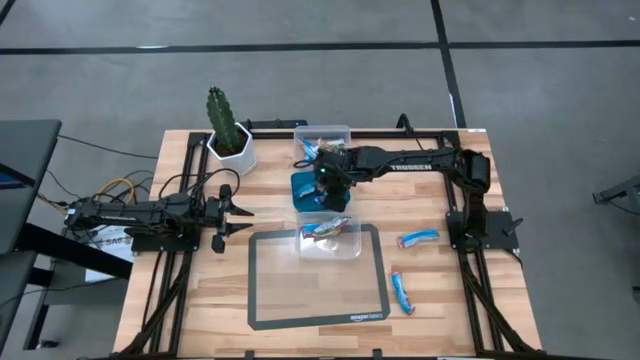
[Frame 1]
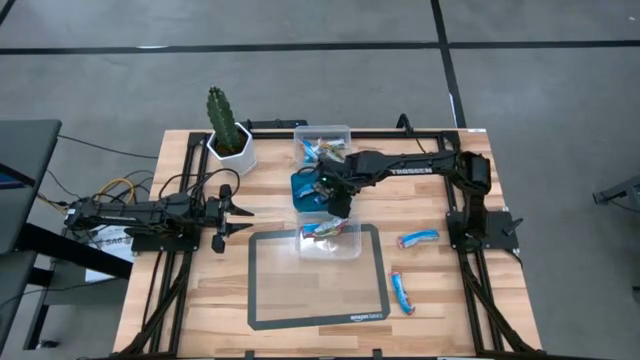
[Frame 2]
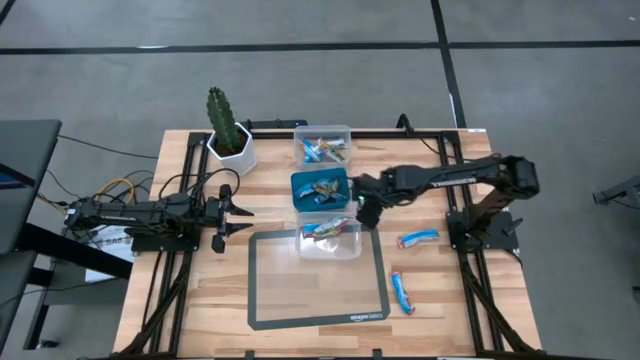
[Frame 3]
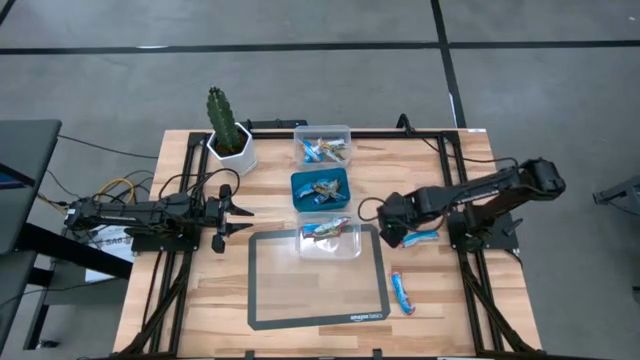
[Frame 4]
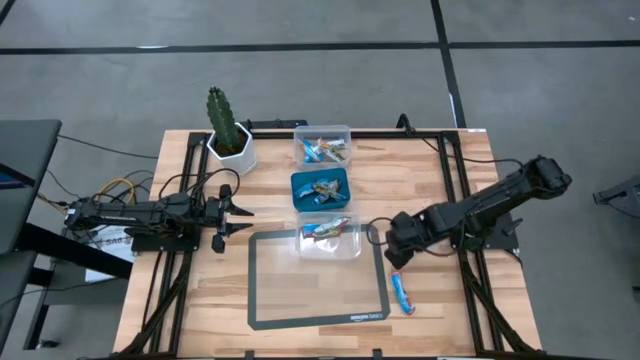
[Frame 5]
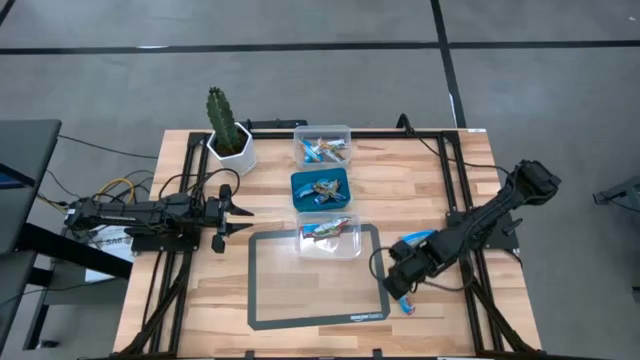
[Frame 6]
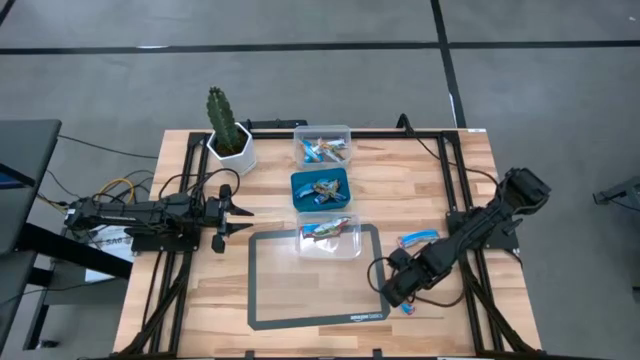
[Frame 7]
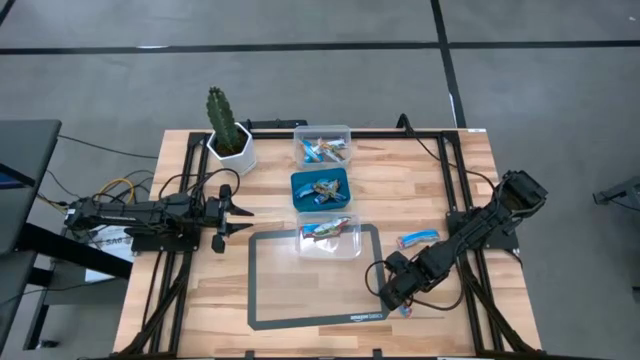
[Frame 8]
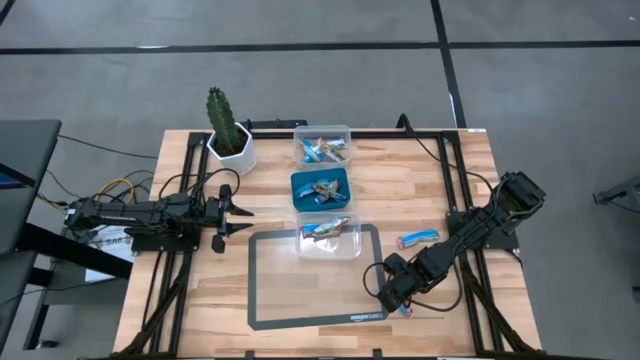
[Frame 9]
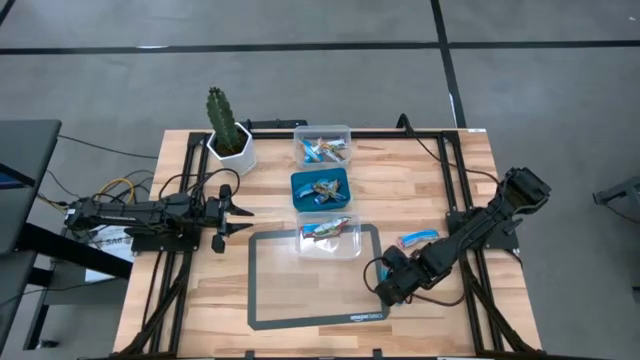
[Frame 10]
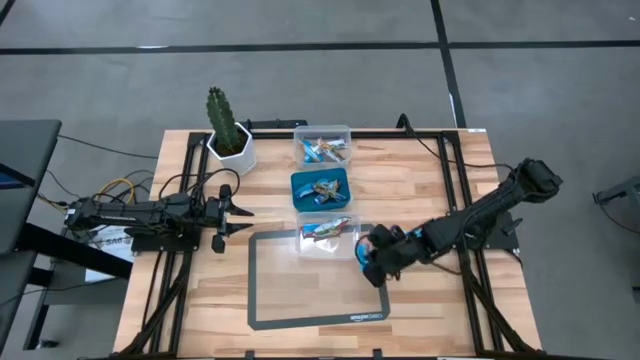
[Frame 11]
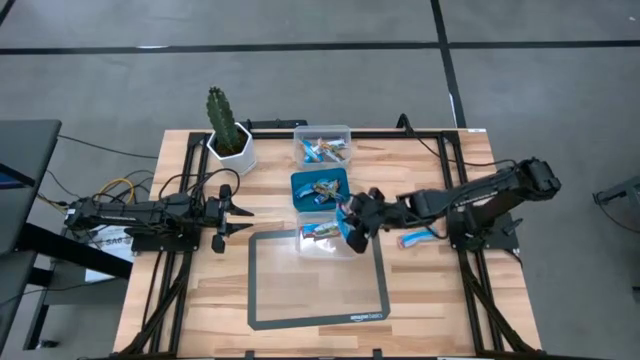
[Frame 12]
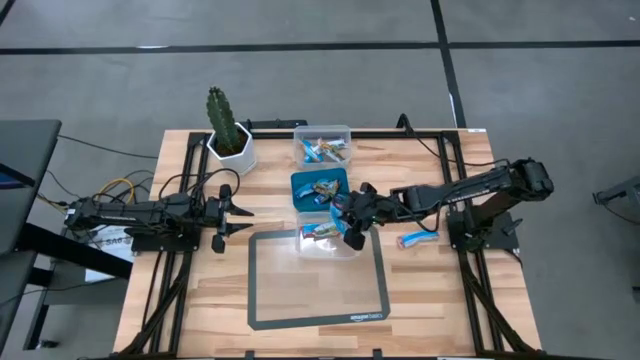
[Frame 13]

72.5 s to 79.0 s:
Task: Pick and place Granola Bars by type
Put the bottom right red granola bar into the bottom transparent bin

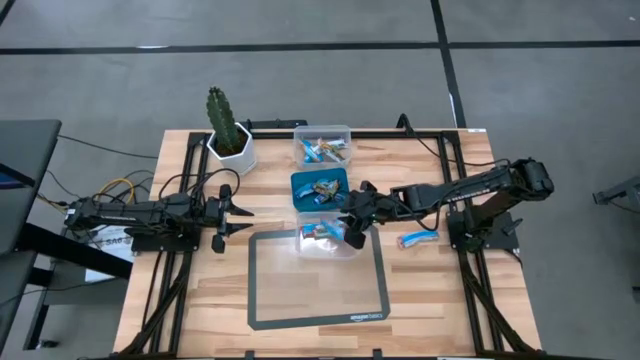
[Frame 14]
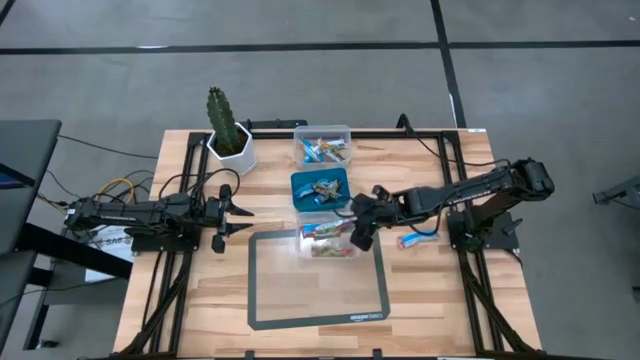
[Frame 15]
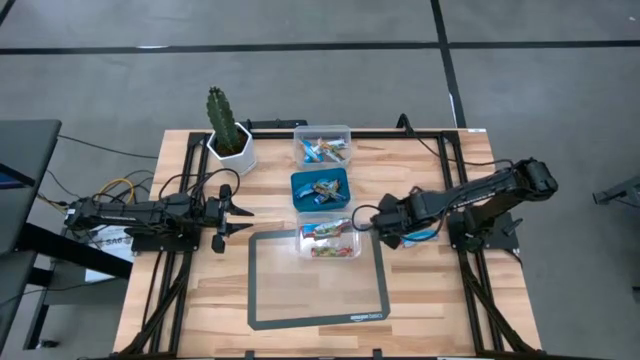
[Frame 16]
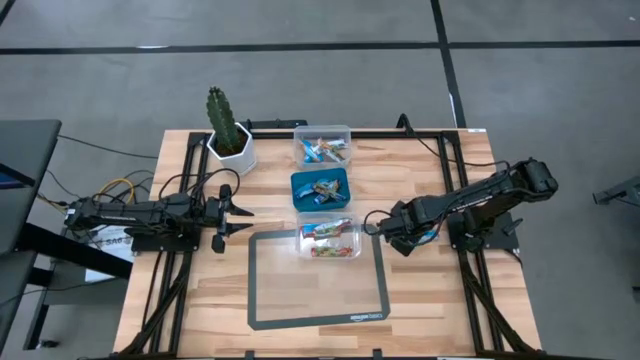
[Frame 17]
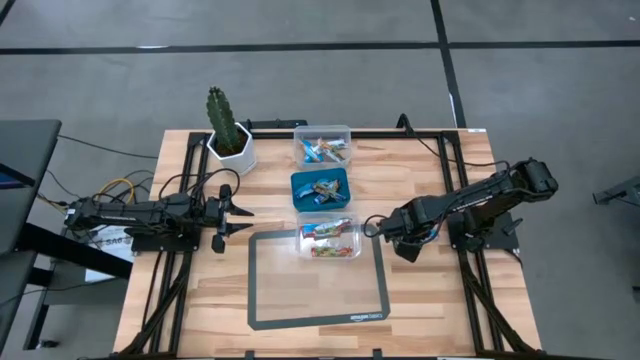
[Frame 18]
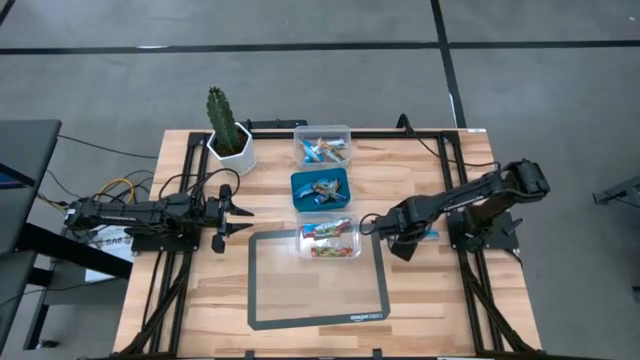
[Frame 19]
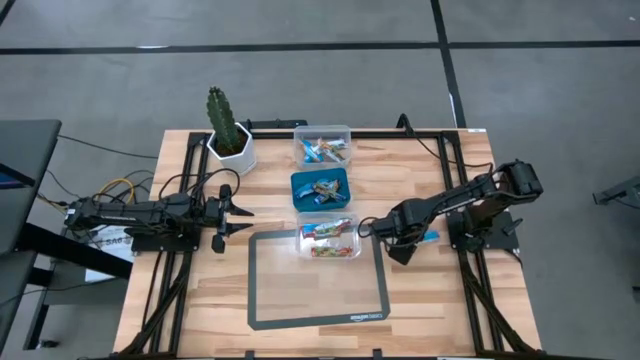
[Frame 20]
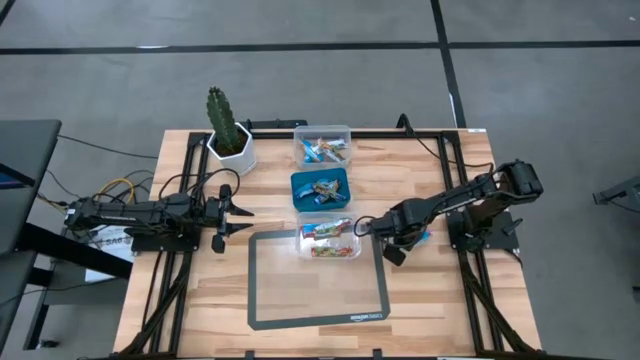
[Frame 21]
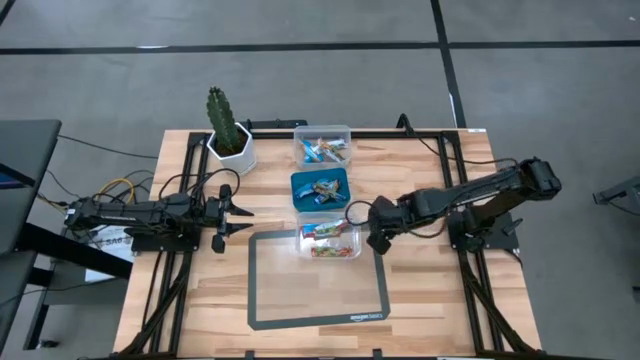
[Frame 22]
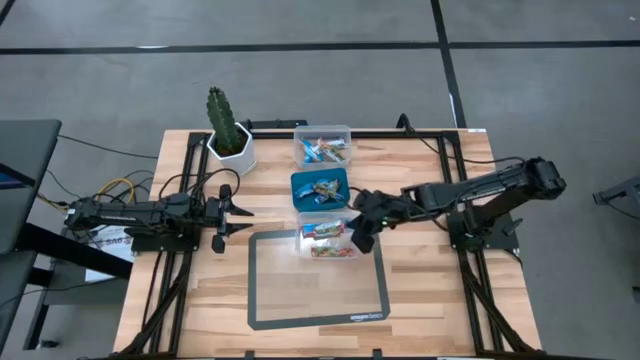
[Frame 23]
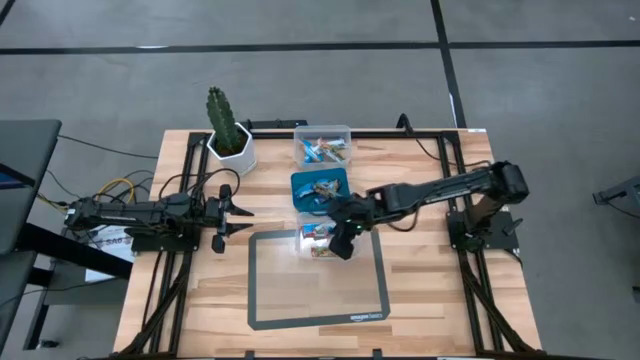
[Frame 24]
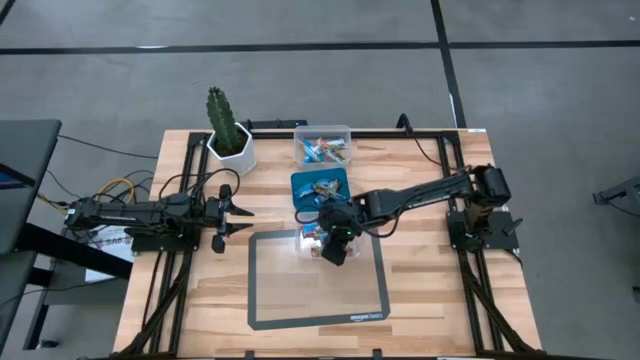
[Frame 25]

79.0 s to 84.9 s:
Put the red granola bar into the bottom transparent bin

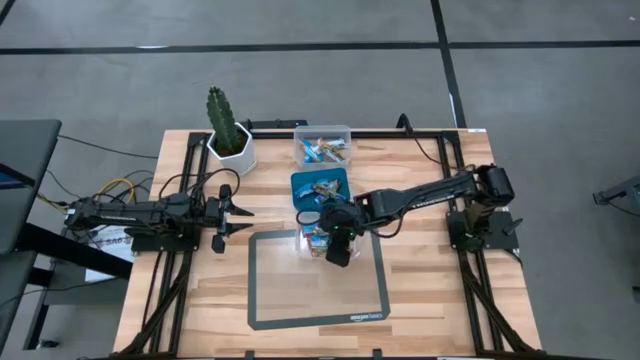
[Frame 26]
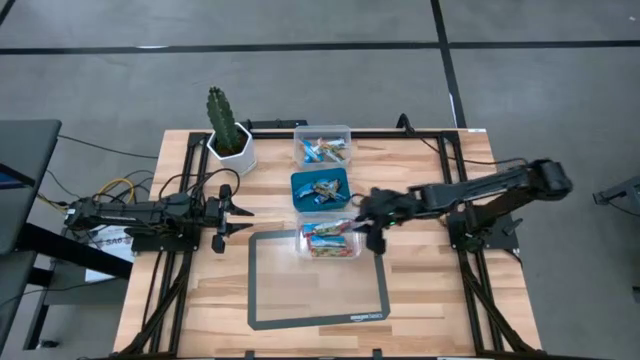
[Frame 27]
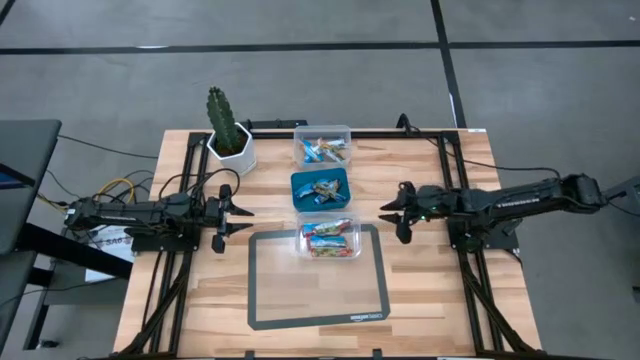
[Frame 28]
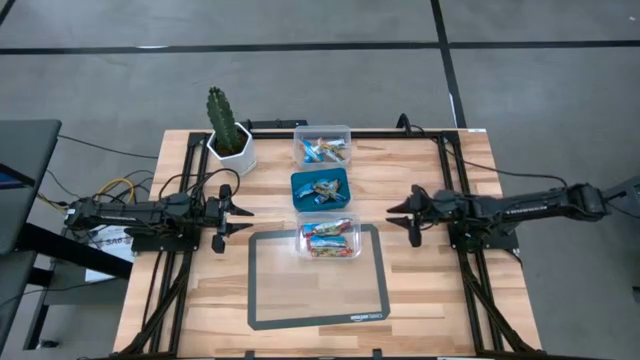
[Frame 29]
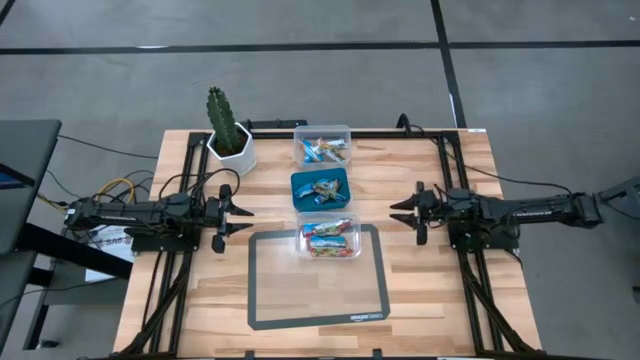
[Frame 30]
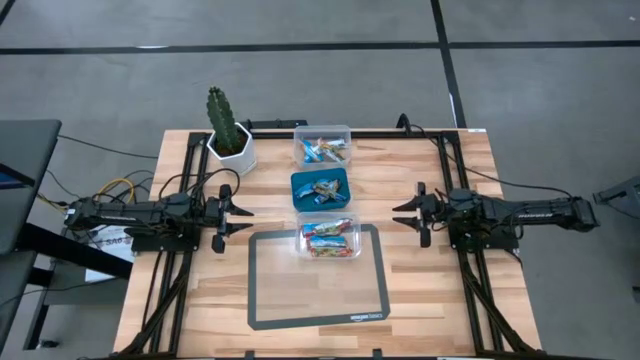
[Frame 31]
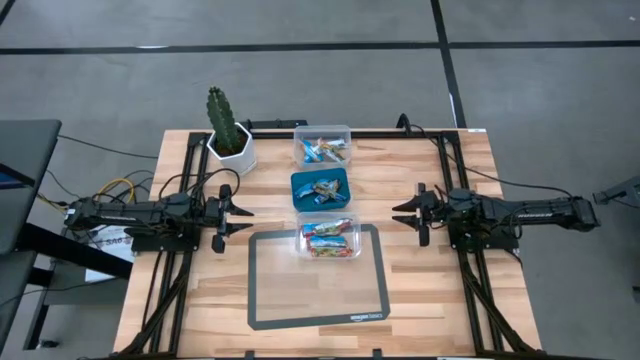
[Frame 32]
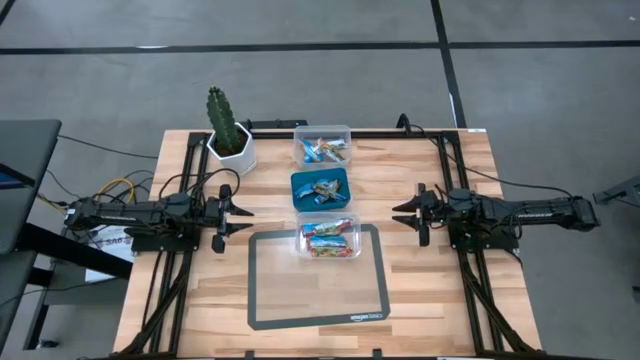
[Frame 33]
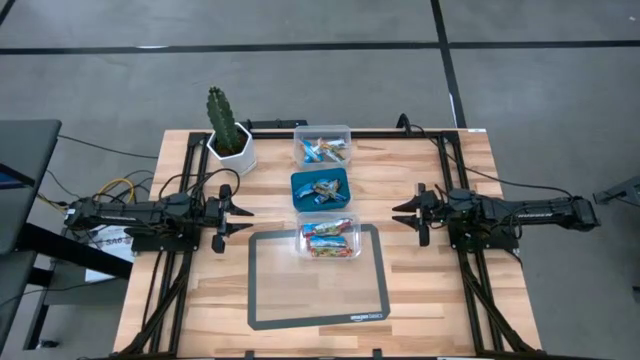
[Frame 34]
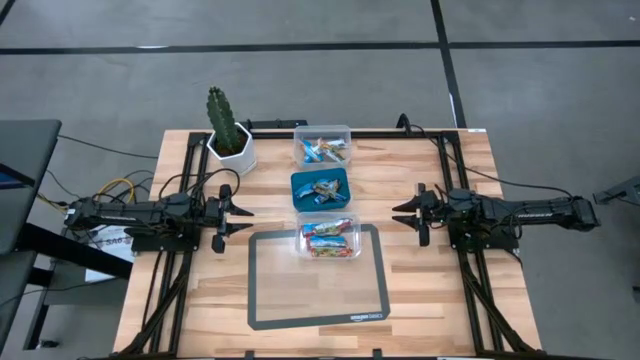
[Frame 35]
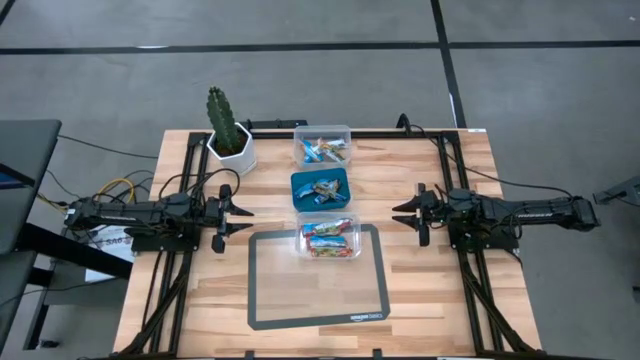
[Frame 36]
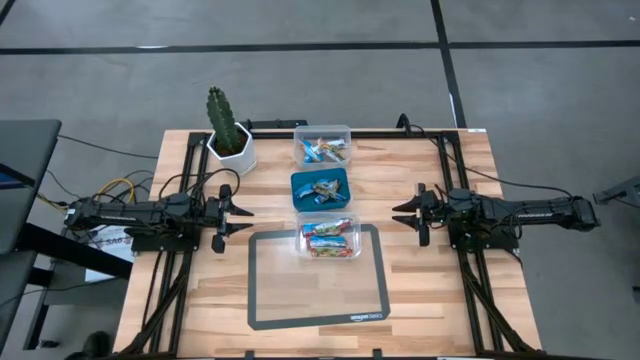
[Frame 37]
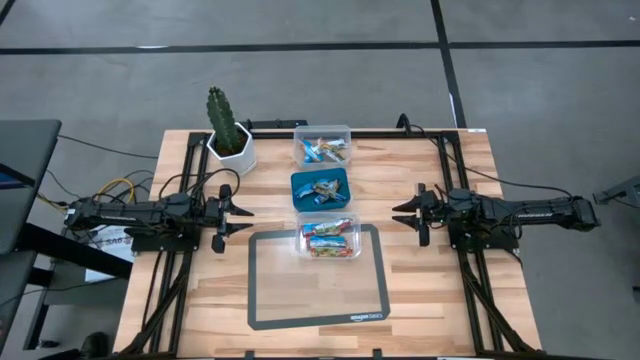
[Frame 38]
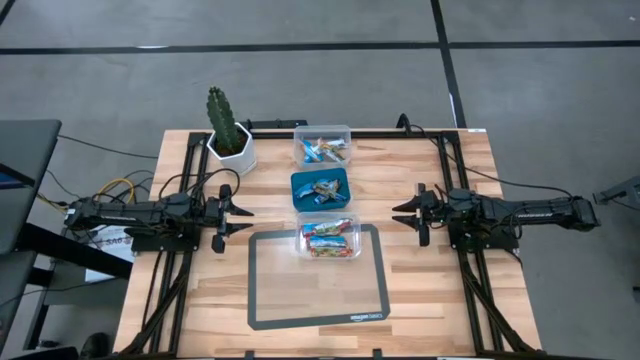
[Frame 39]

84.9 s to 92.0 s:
Return to Home Position

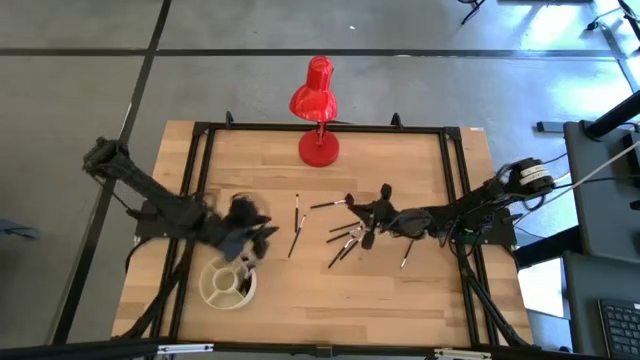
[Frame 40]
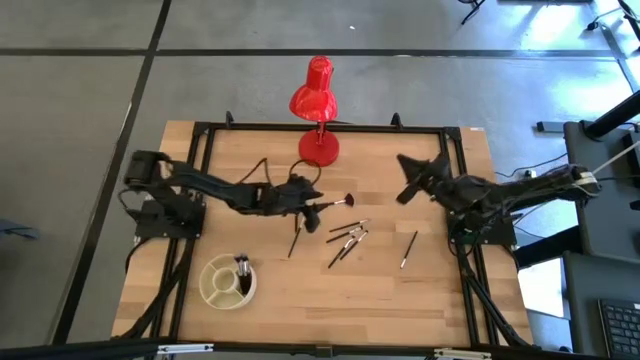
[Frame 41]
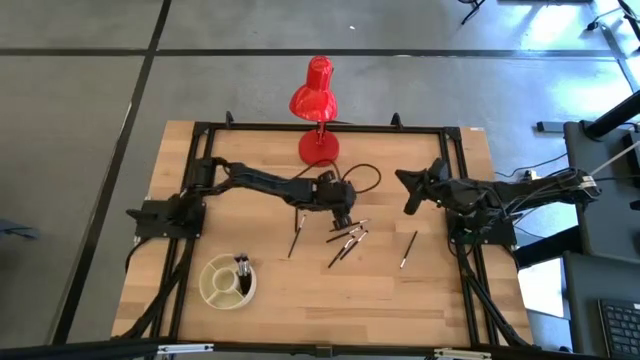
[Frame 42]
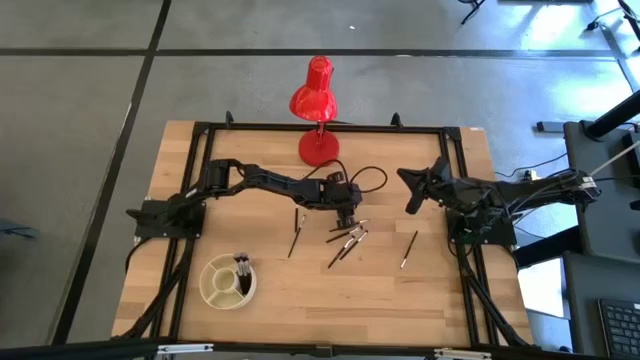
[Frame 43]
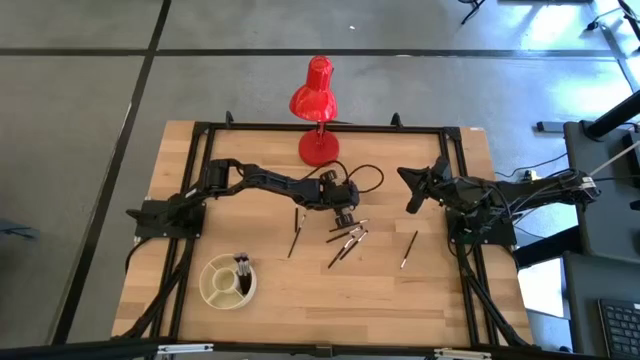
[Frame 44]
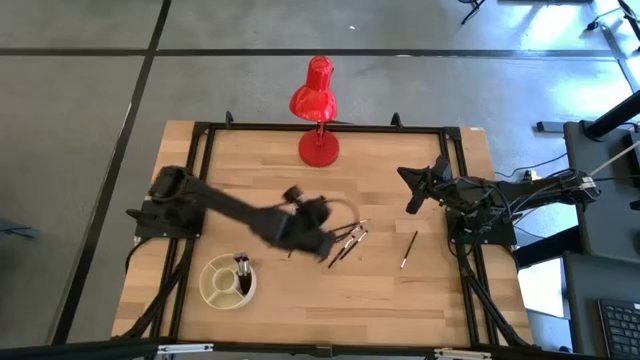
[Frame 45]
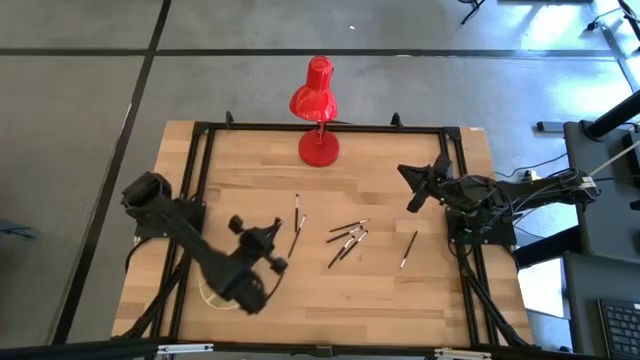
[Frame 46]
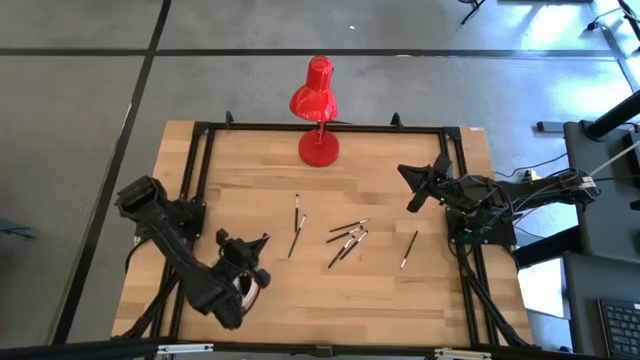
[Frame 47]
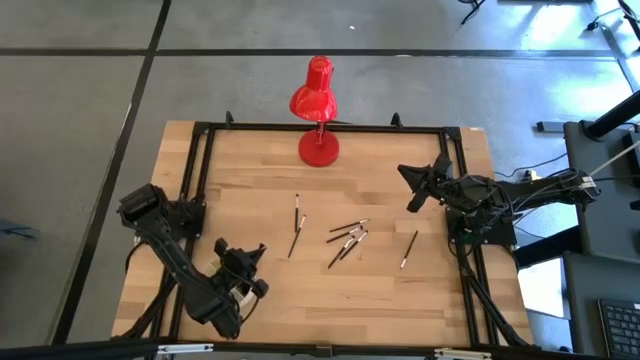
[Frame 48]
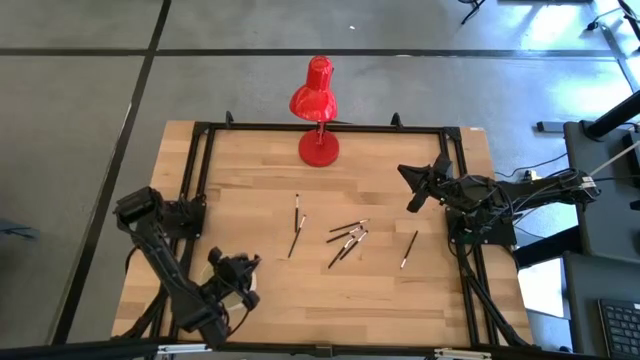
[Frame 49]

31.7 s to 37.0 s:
Task: Put items in baskets/containers
Put the highlighter brush into the organizer bin
